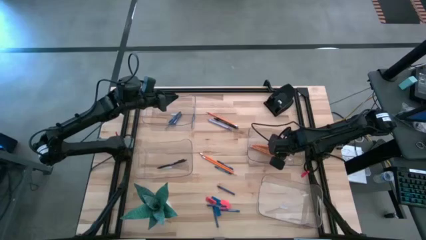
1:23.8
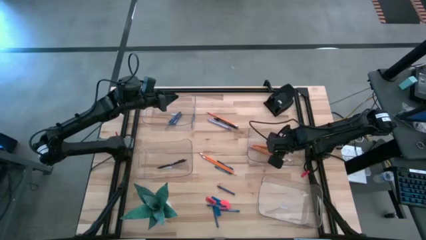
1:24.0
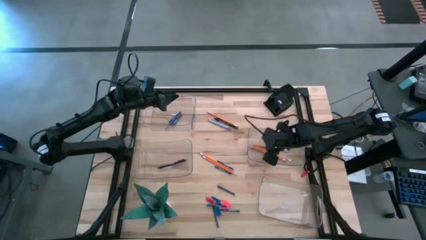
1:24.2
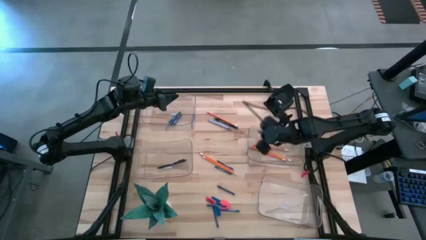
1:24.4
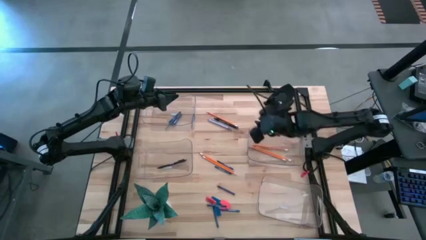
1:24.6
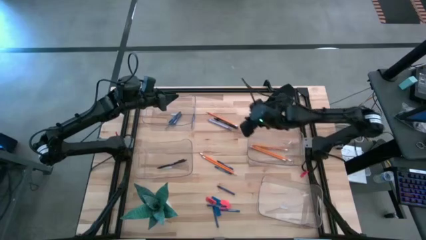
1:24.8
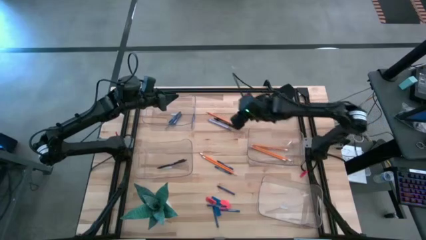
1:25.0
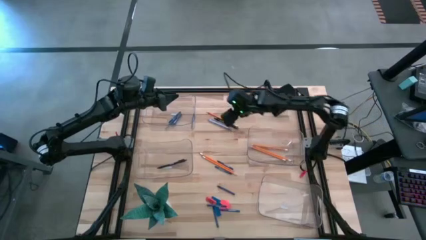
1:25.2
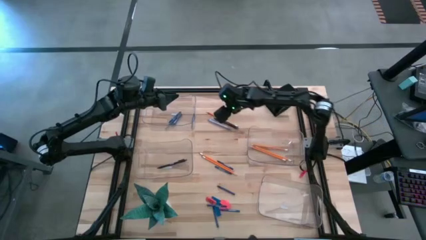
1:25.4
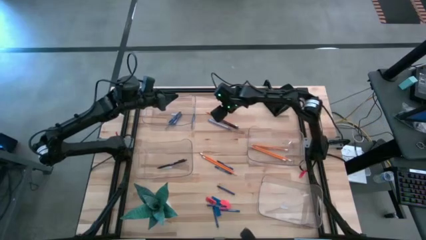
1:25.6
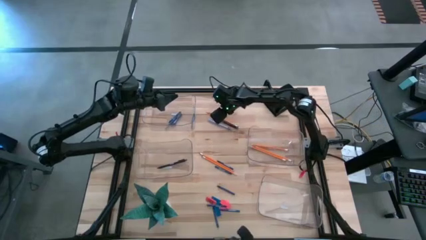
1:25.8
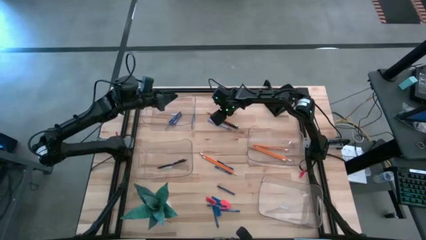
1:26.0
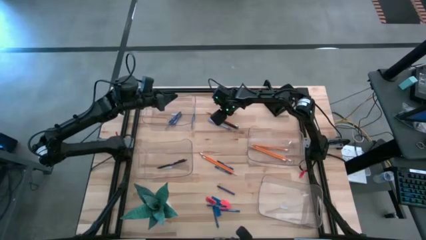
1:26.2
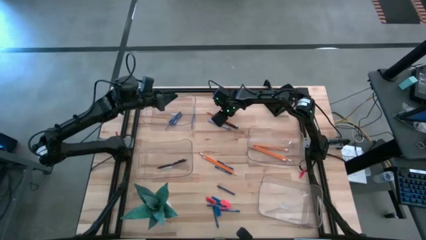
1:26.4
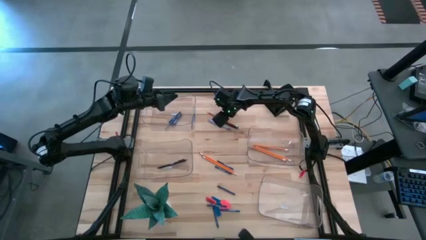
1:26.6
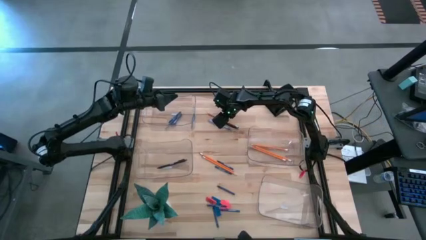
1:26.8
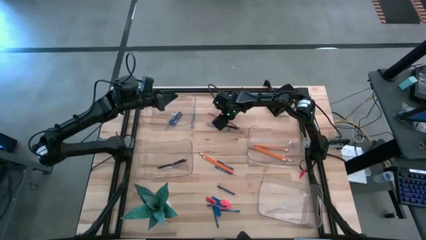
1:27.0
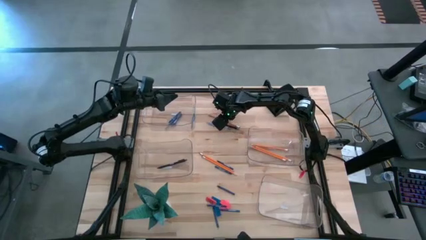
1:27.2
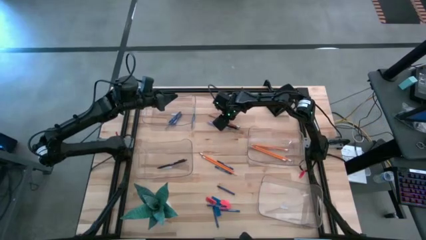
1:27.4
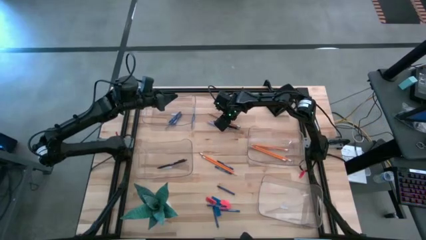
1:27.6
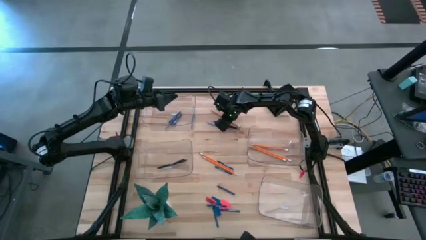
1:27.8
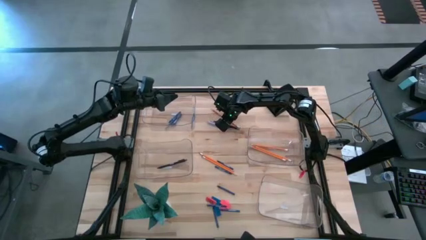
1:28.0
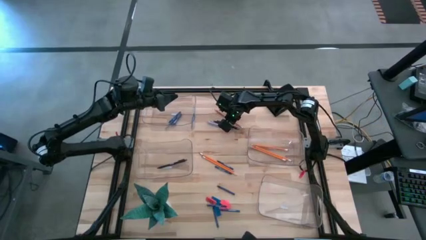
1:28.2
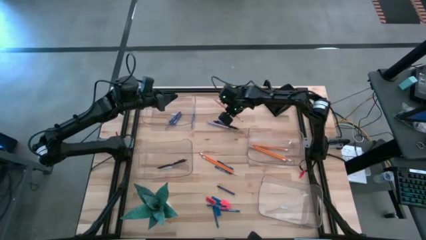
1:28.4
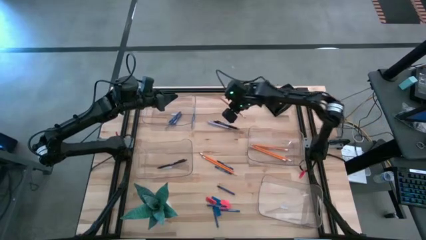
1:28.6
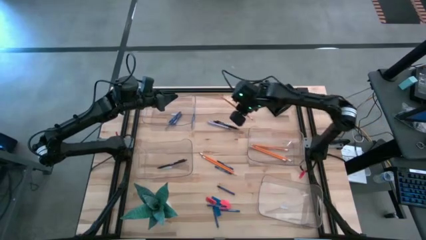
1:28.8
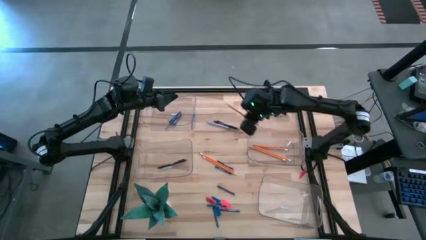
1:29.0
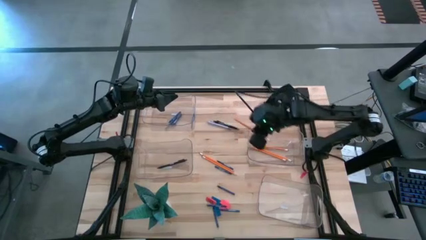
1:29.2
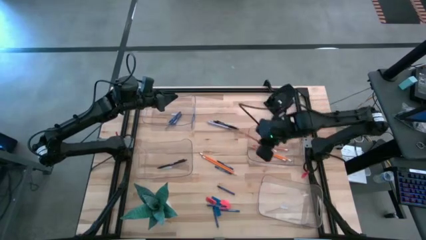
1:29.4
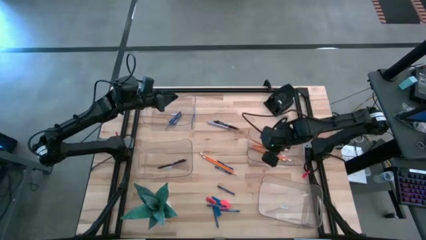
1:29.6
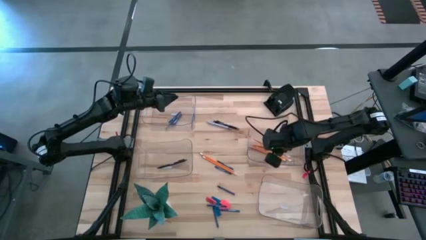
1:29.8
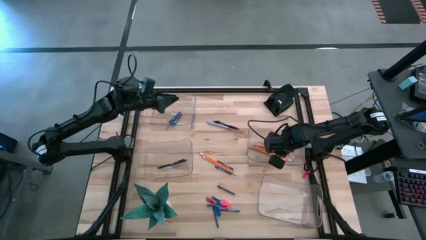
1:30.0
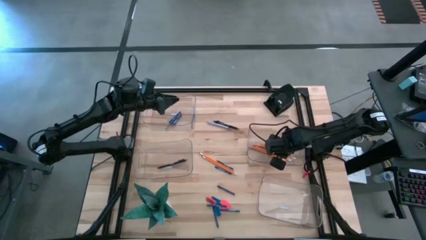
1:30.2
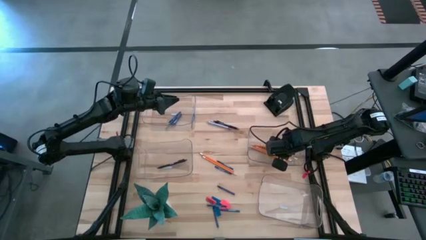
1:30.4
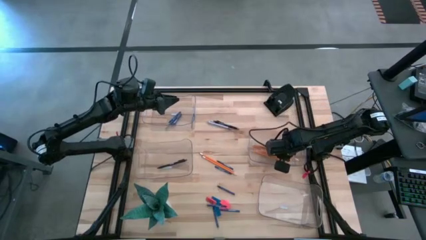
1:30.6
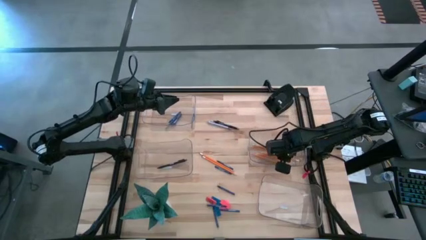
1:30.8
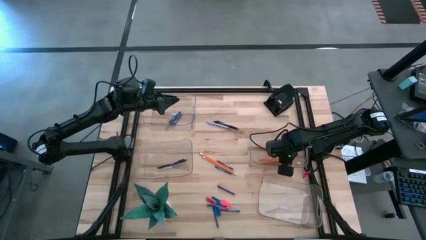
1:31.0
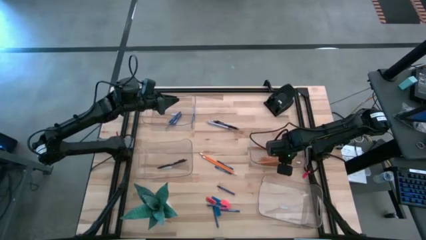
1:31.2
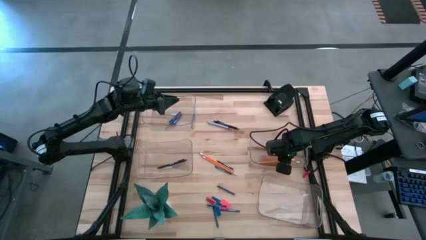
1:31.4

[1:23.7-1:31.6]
Task: Sort crayons/erasers/pens/pencils in bins
Put the orange pencil into the middle right transparent bin

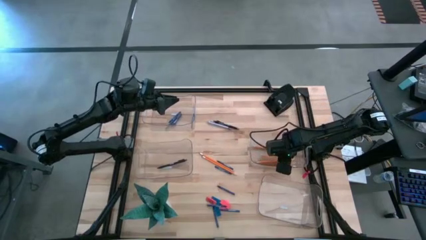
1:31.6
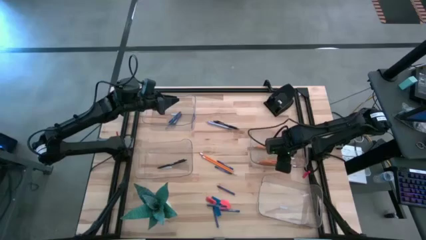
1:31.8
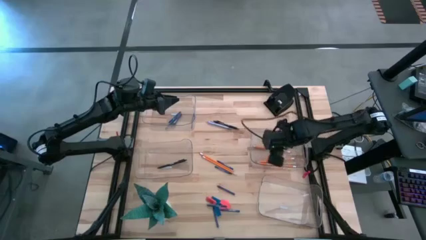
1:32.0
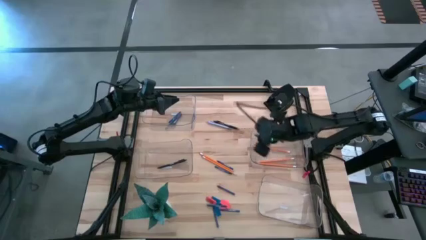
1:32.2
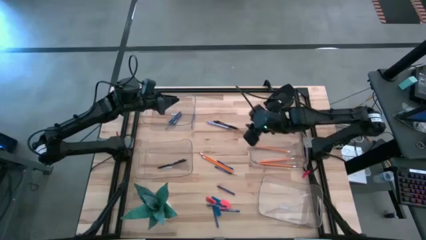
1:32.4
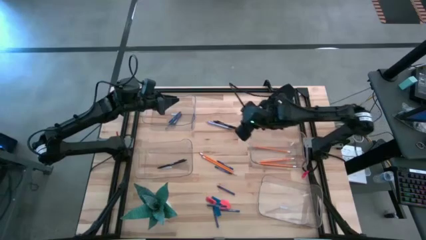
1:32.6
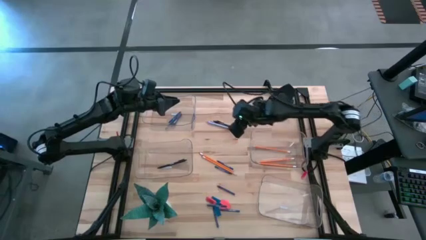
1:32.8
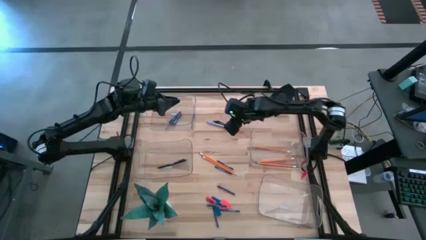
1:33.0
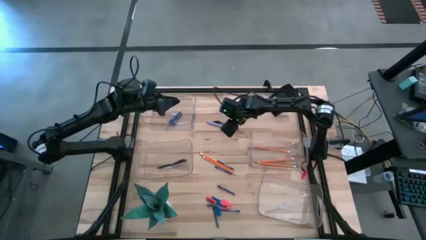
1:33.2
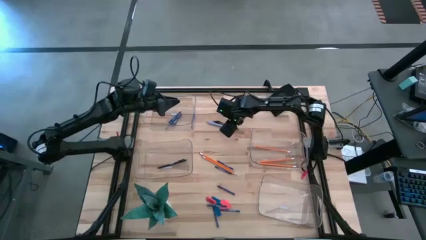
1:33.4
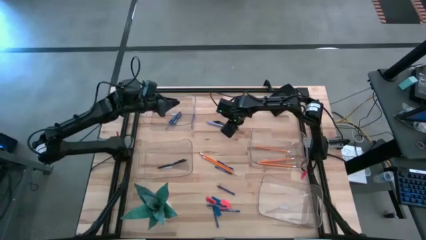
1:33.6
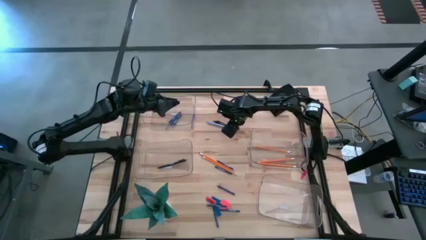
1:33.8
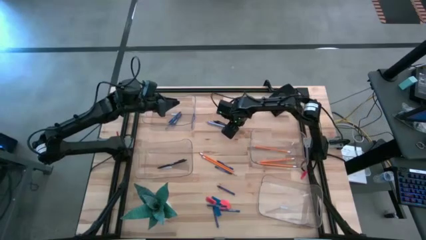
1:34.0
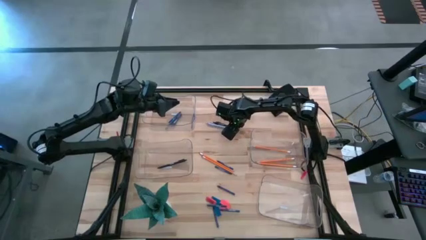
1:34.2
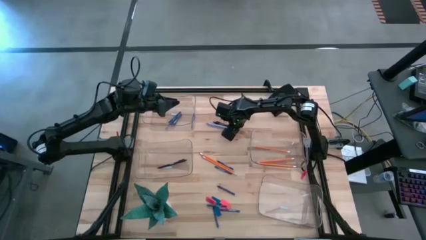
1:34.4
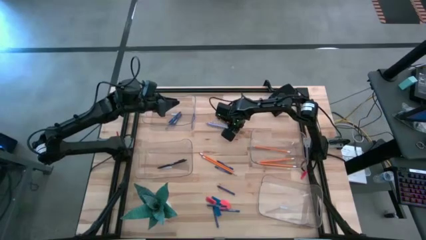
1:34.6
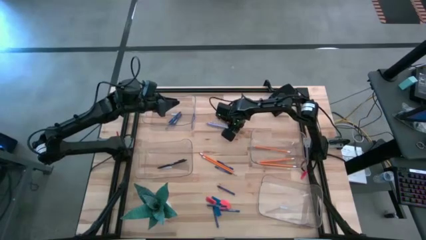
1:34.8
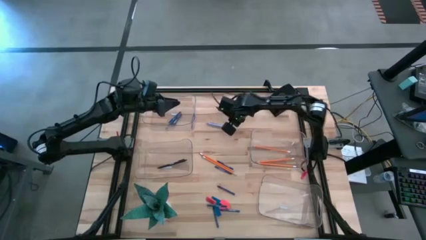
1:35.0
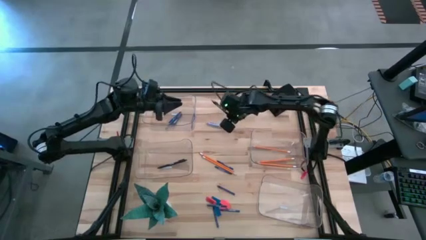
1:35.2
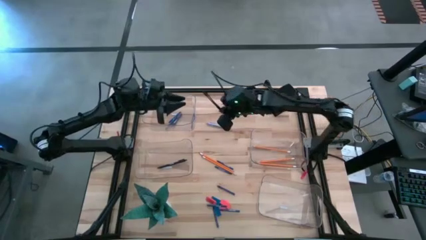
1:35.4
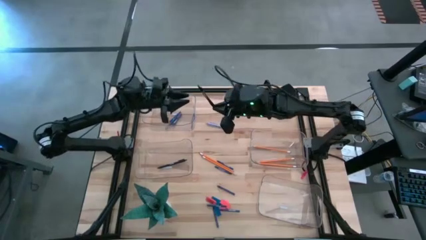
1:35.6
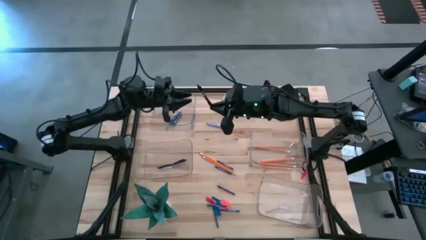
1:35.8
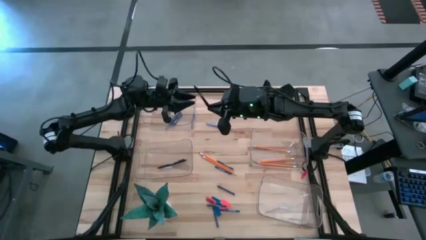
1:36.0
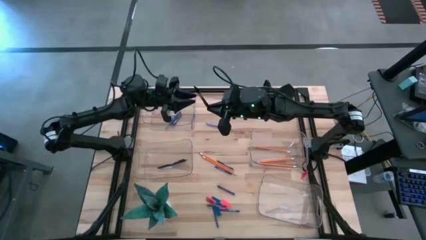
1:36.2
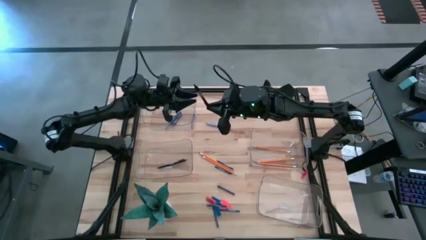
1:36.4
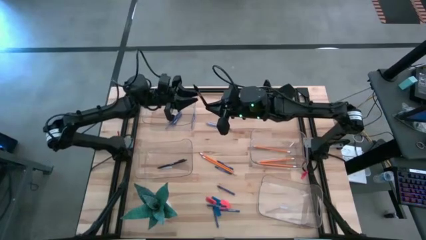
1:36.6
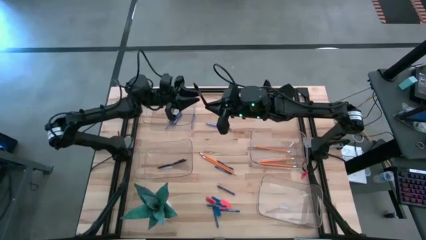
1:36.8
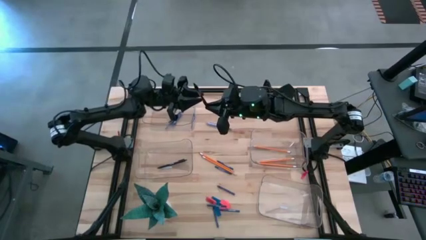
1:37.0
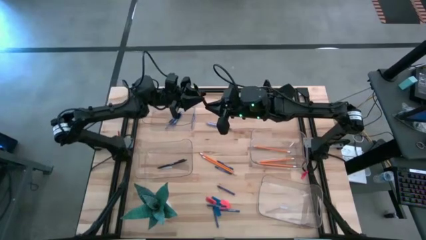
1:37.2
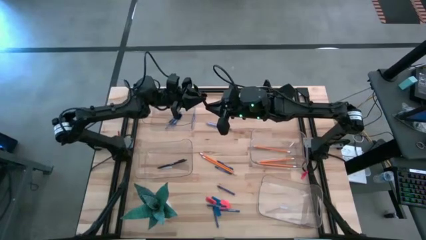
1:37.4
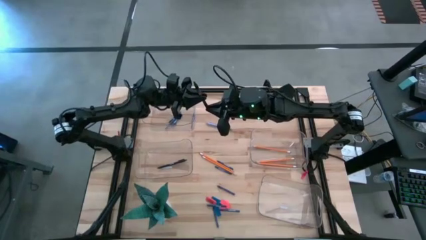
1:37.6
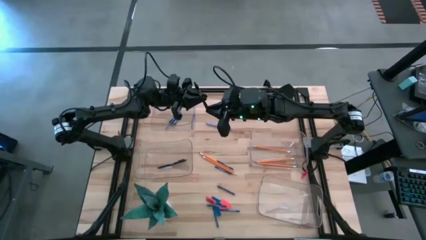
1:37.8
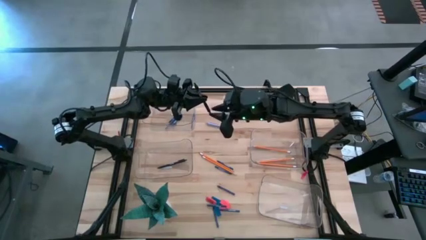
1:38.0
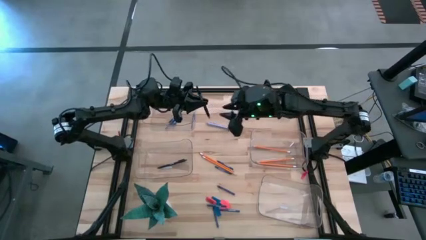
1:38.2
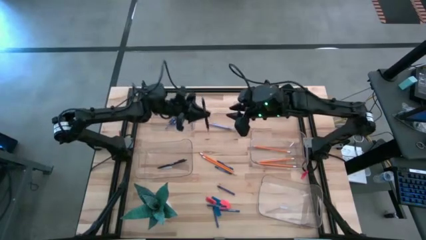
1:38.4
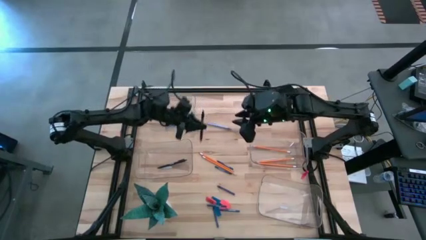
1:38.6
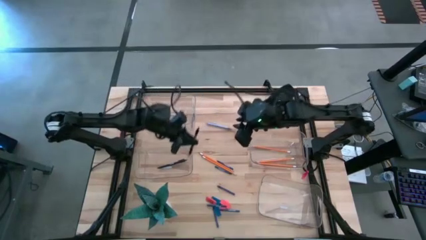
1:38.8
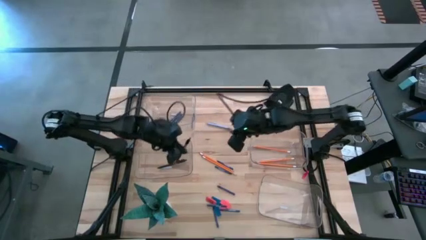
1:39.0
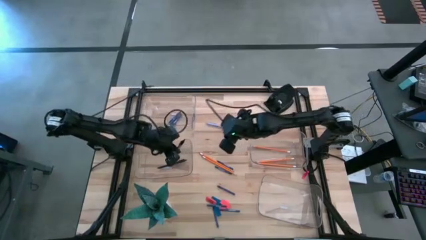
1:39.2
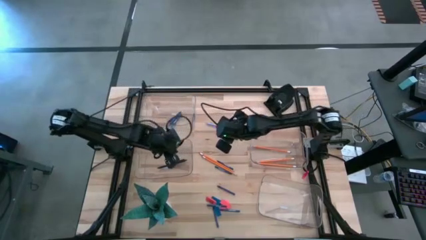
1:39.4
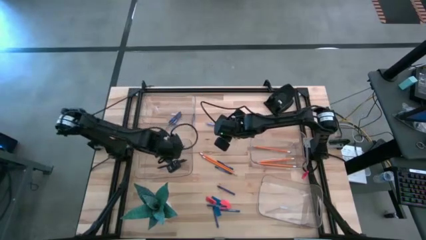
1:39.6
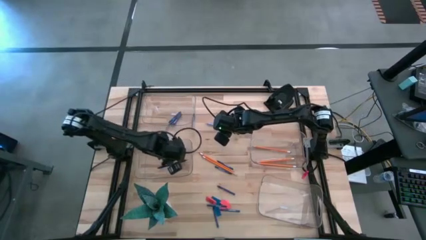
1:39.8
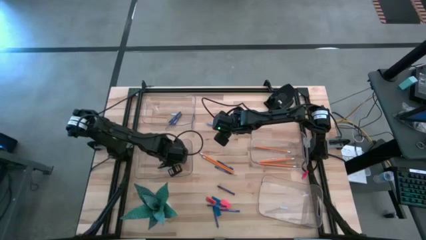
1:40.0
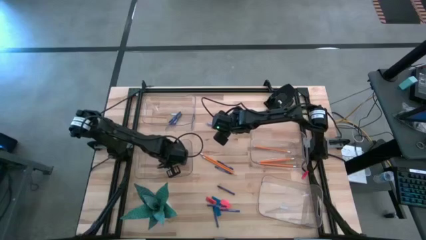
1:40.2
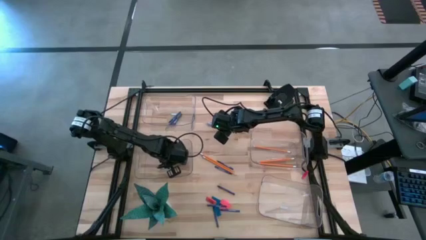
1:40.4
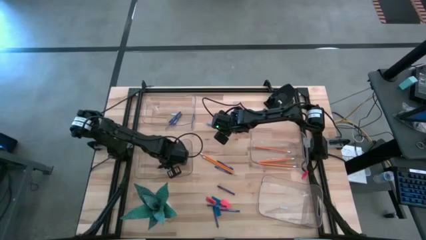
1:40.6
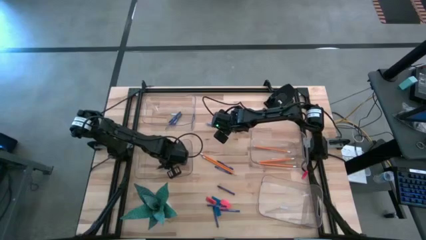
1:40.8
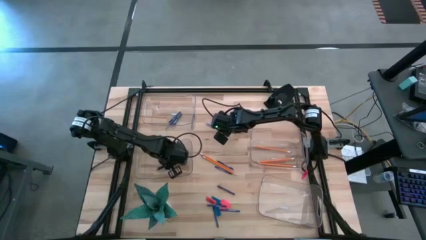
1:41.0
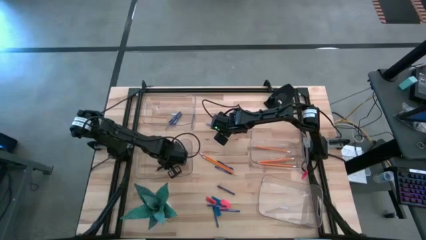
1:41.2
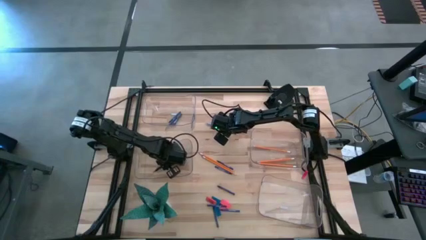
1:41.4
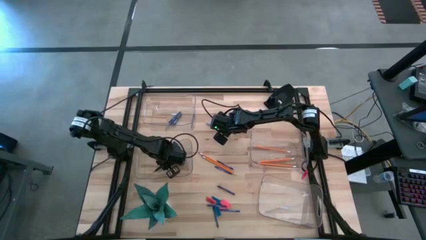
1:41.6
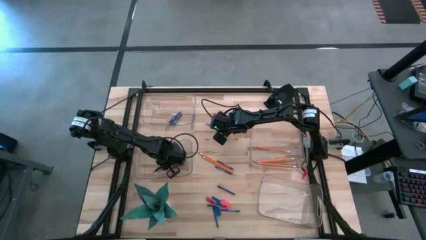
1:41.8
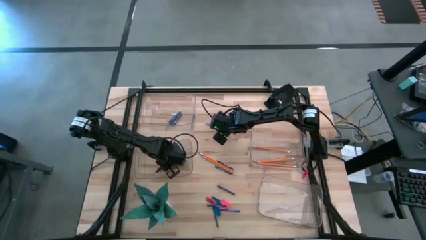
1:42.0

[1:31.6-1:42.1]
Put the black pen into the middle left transparent bin
